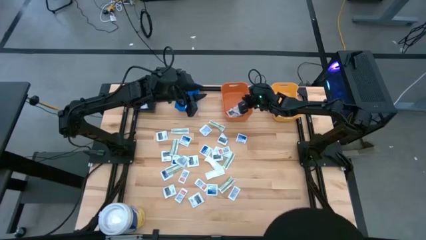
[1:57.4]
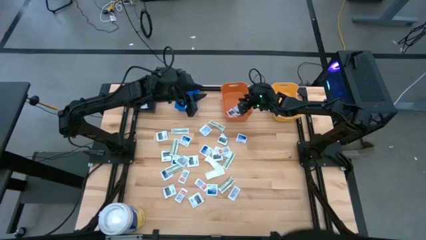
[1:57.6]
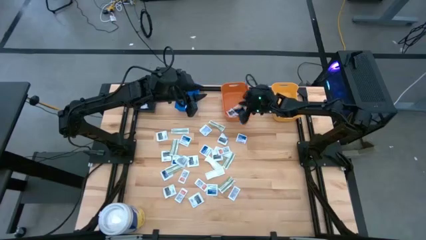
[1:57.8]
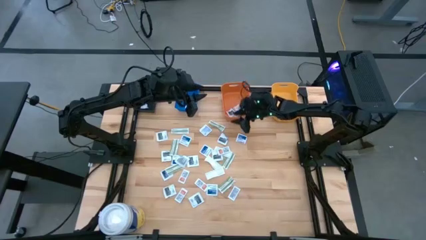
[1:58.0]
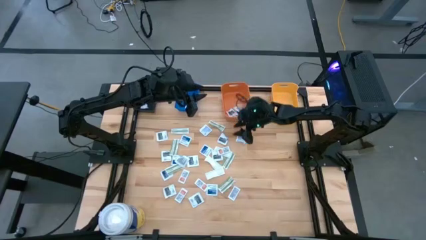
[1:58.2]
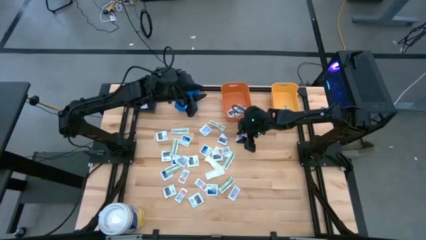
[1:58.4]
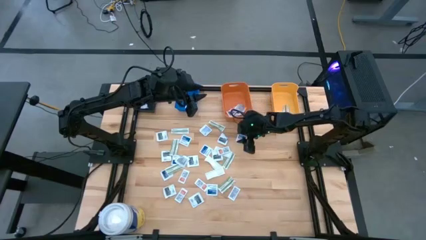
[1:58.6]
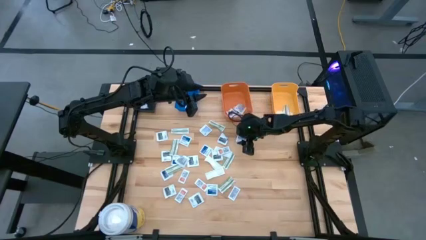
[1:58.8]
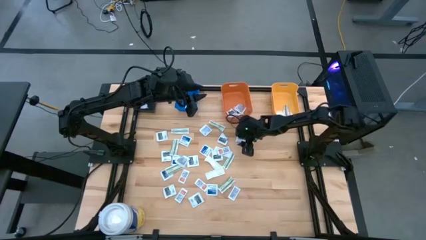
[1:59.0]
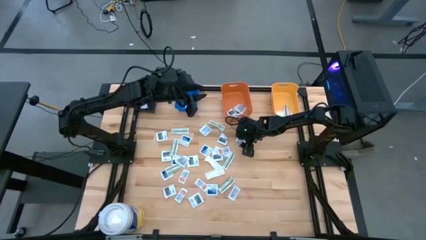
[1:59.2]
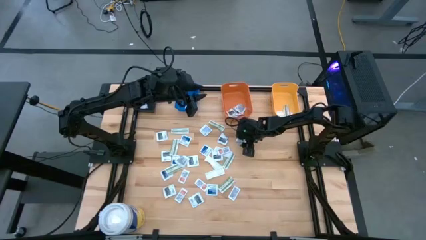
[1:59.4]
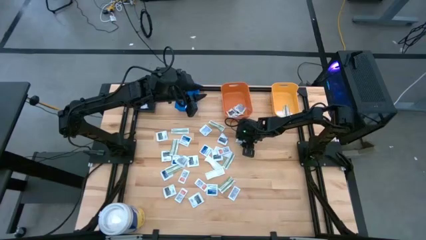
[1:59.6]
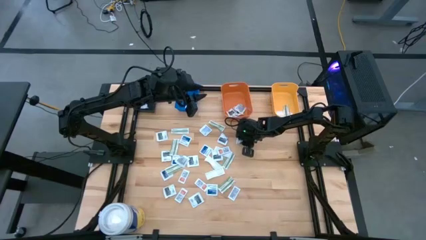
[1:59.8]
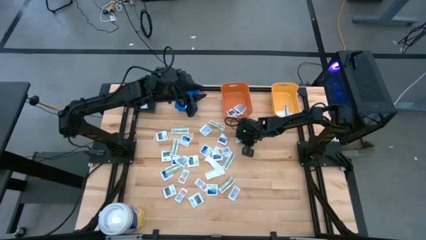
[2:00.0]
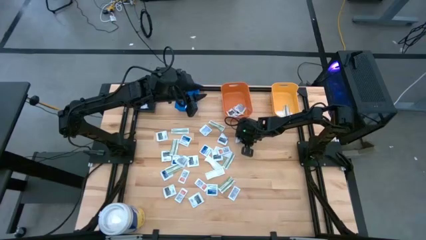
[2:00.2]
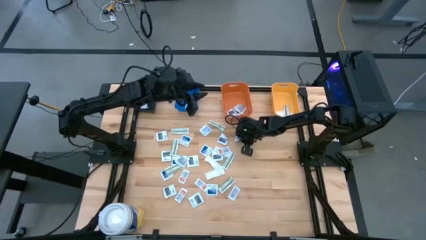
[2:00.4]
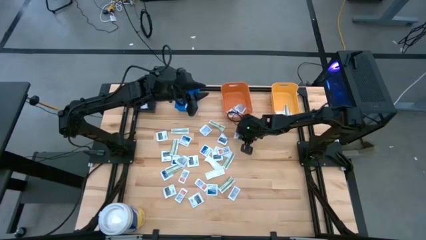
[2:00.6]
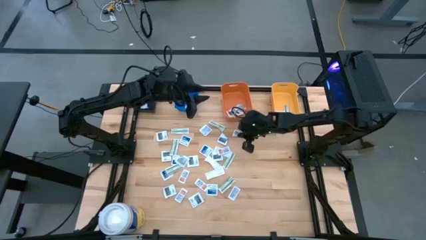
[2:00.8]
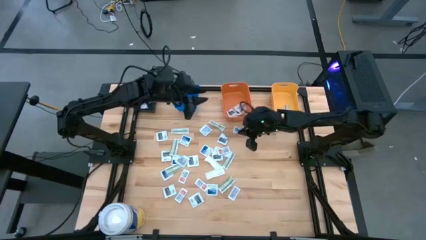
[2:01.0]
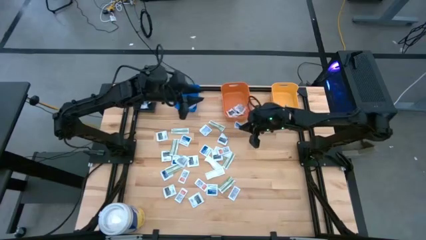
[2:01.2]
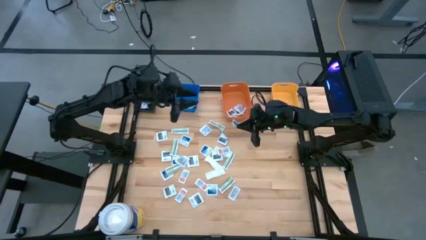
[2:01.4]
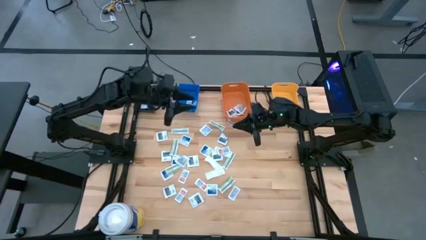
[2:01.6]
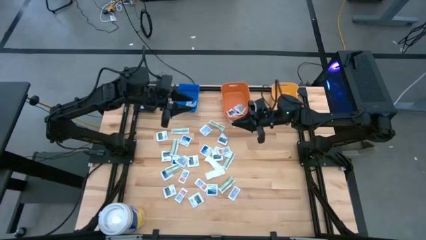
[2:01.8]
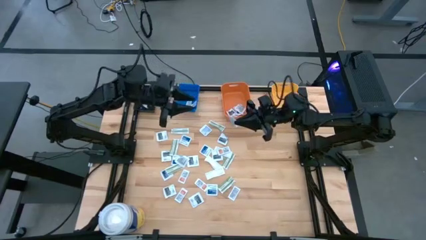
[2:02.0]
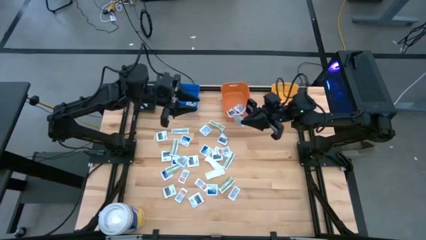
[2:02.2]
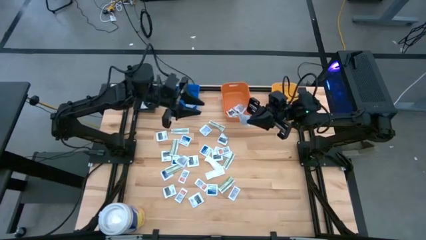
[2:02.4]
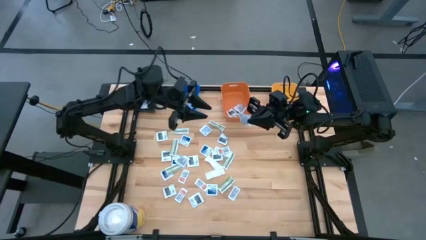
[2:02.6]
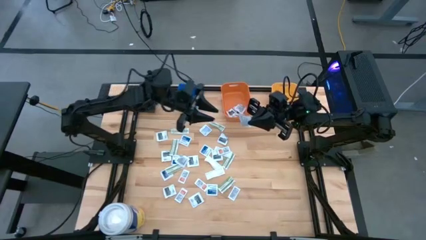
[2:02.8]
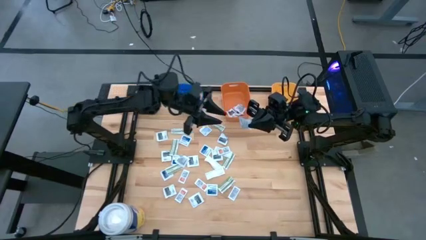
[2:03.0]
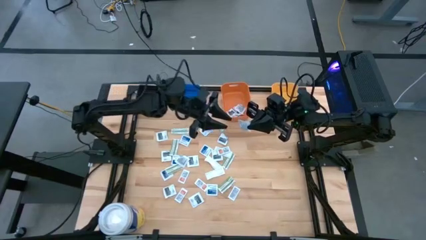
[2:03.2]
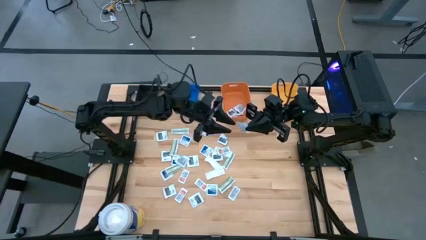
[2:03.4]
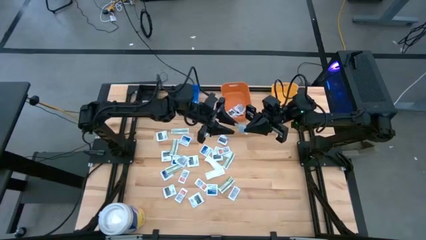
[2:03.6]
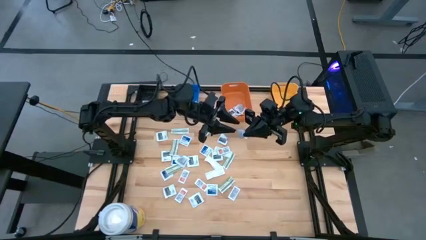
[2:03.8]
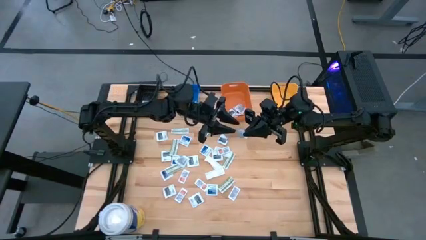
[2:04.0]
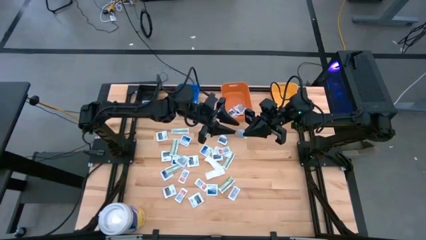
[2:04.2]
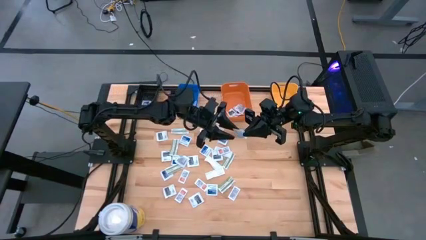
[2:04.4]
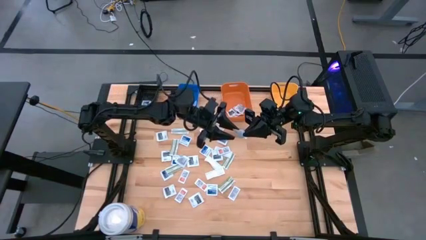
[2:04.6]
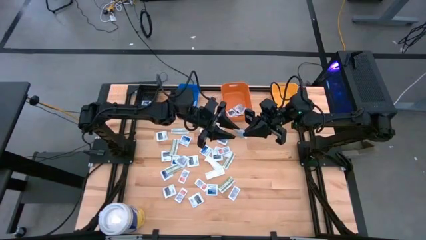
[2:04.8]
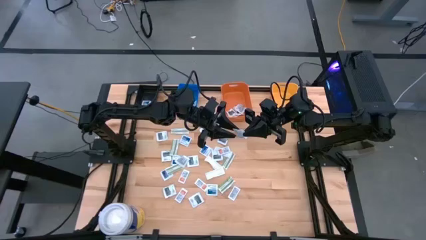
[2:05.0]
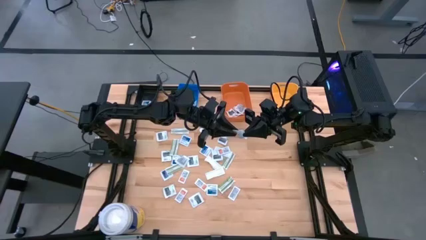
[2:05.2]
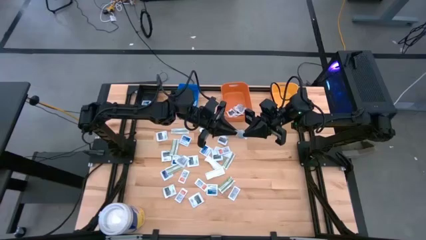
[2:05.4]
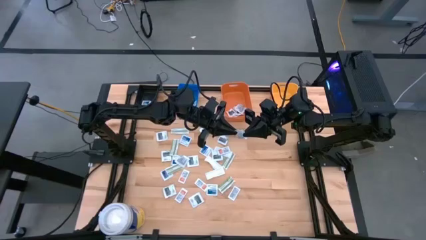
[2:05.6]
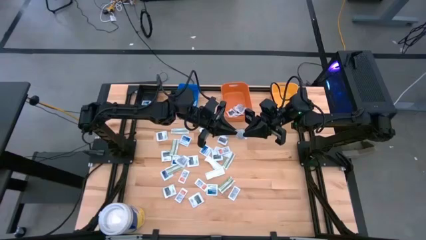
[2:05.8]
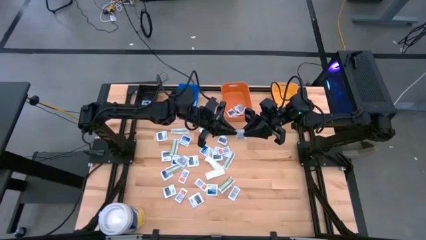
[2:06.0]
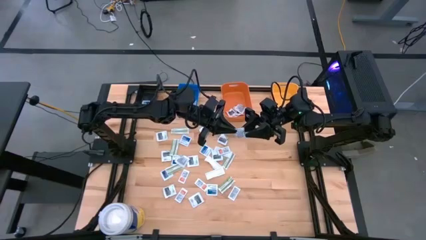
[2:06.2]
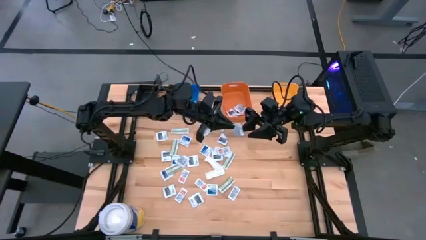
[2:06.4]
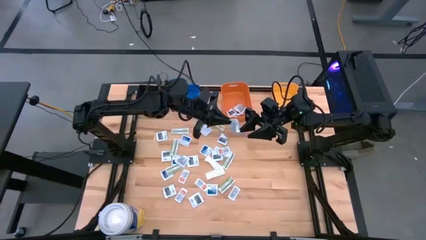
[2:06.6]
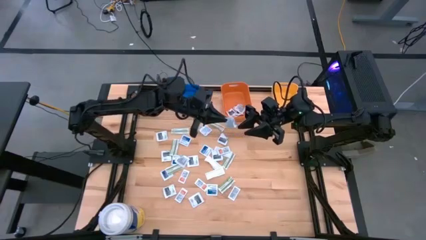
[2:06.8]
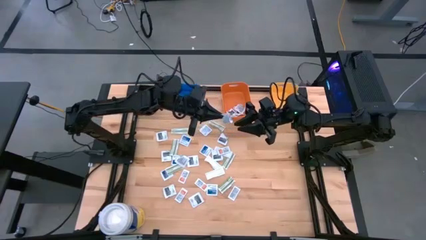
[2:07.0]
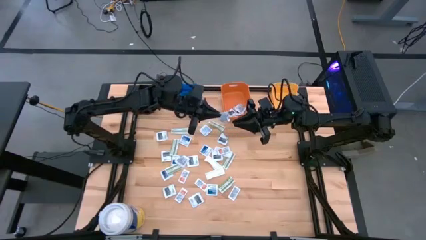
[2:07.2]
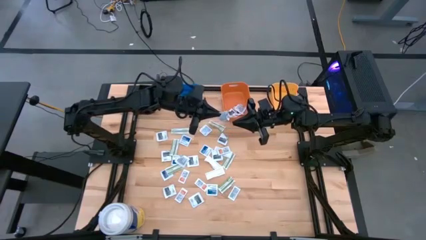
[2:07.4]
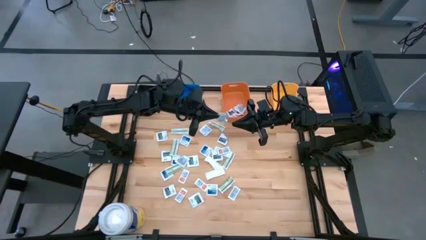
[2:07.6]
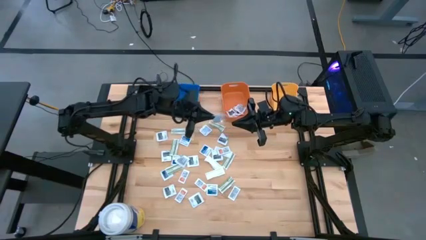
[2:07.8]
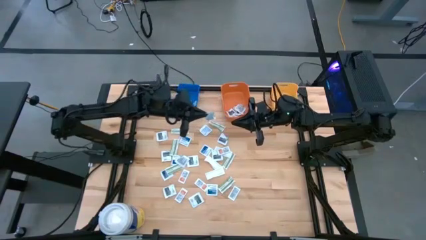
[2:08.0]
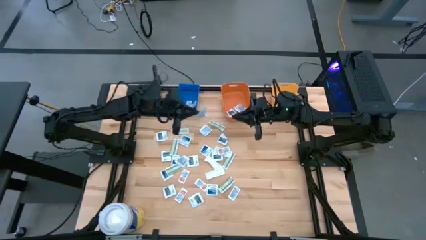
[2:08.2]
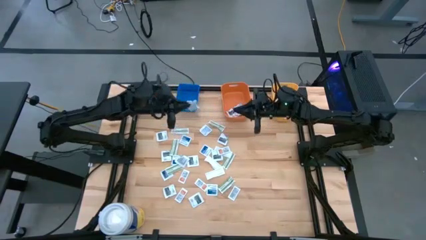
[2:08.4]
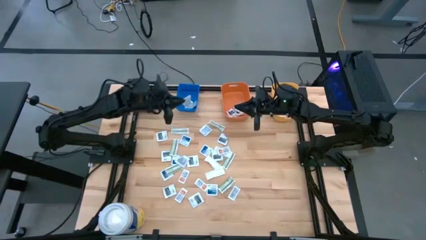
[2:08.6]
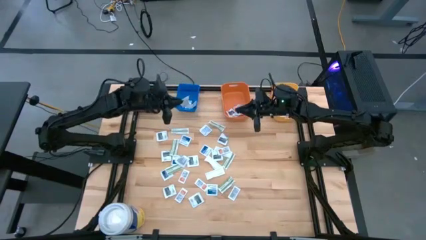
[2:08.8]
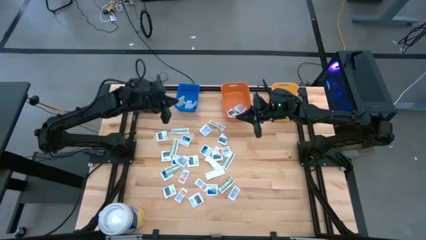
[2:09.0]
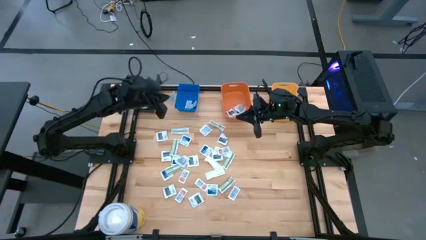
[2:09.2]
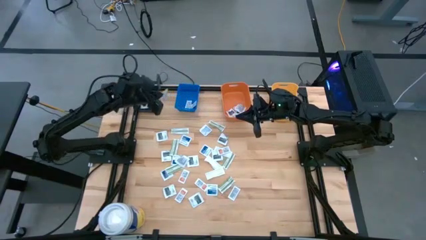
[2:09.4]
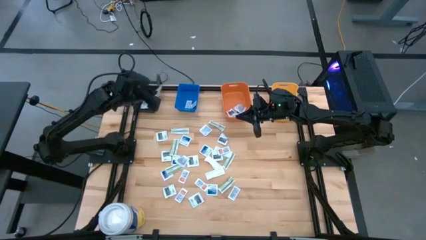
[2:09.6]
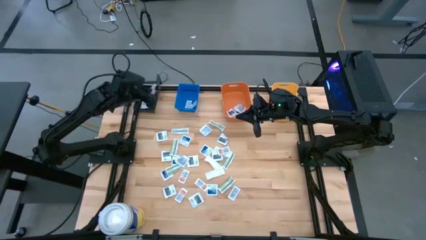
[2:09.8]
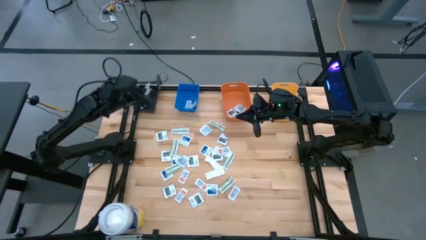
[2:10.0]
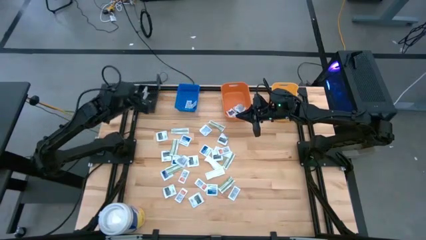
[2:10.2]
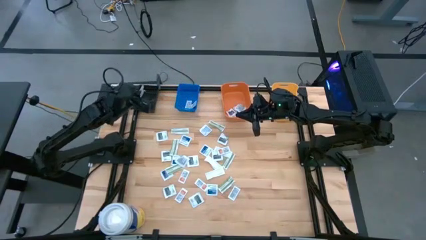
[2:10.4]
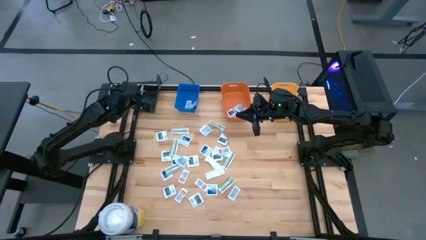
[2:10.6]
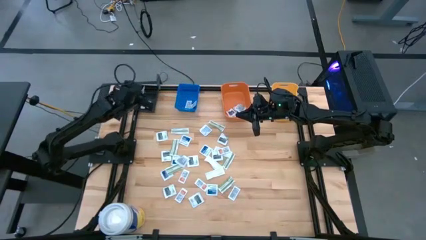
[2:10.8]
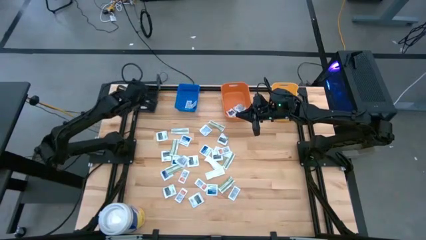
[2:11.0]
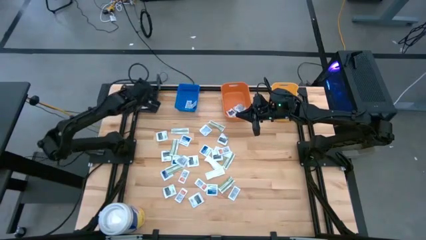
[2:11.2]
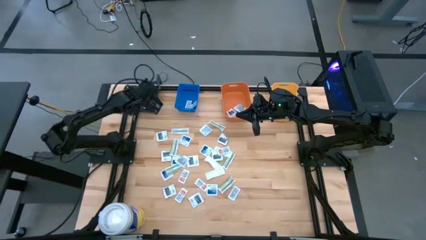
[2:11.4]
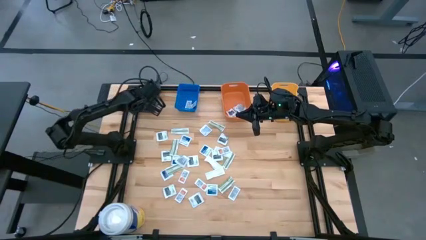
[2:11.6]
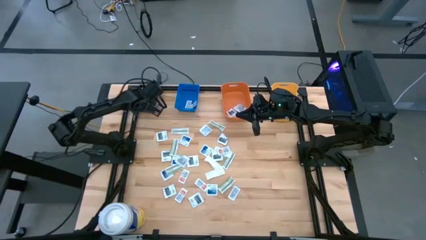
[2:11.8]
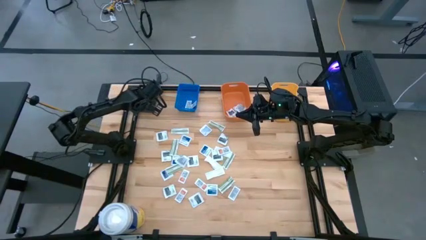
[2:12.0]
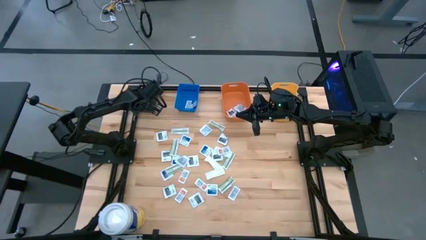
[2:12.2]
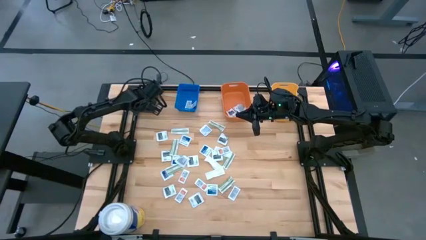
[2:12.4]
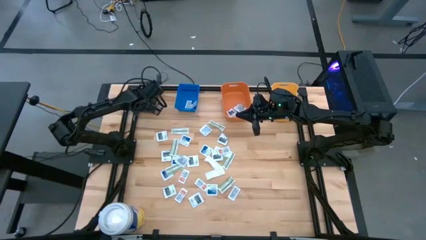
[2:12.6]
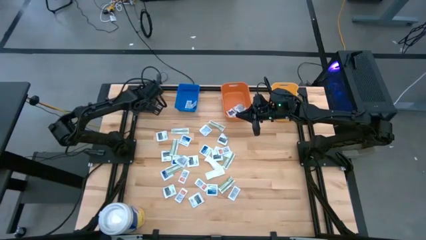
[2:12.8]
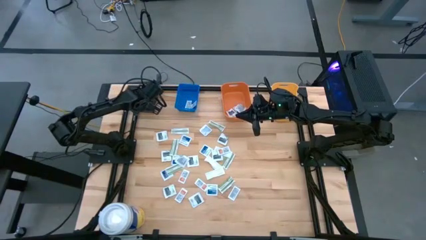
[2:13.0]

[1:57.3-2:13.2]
Task: Pick & Place First Aid Supplies
Put the alcohol pad into the black bin
